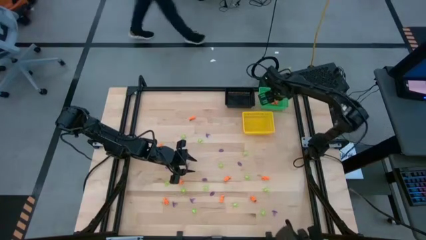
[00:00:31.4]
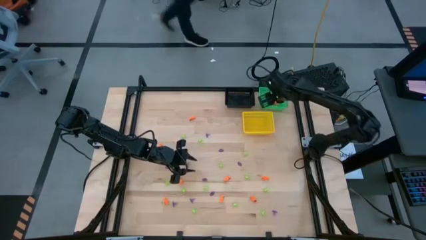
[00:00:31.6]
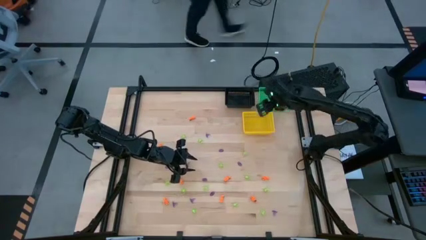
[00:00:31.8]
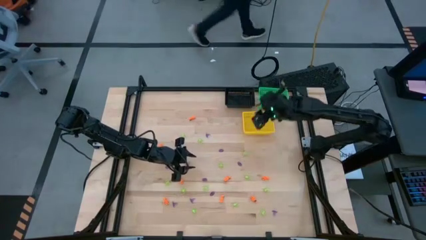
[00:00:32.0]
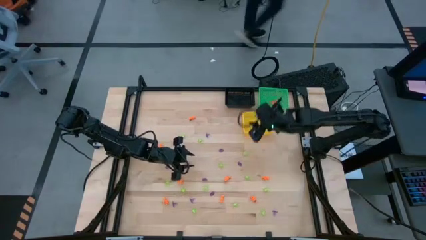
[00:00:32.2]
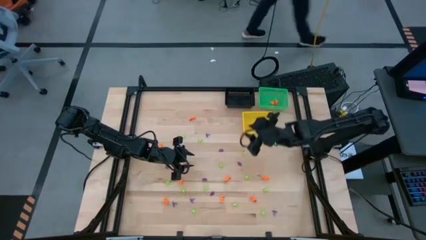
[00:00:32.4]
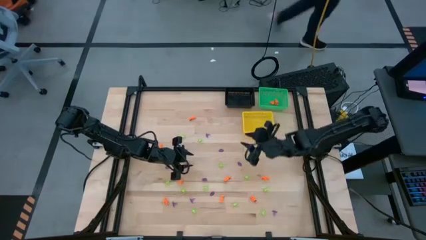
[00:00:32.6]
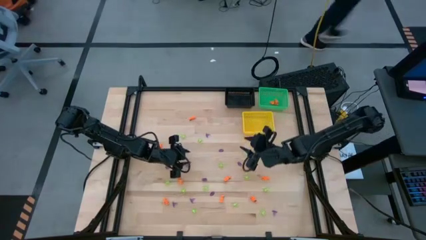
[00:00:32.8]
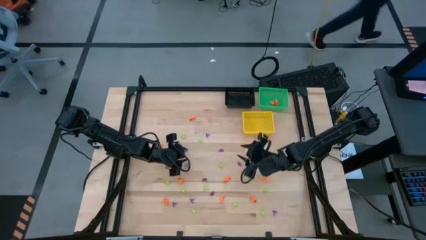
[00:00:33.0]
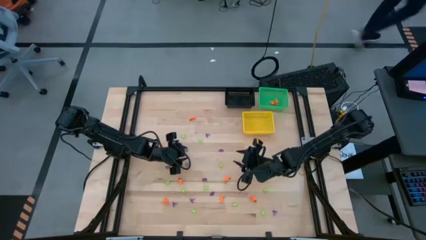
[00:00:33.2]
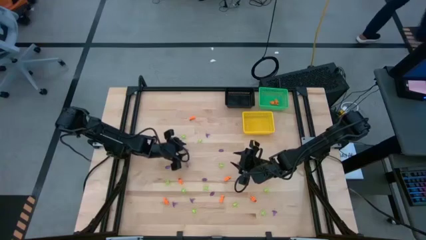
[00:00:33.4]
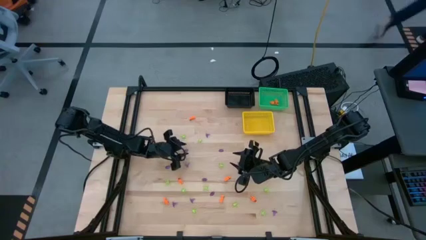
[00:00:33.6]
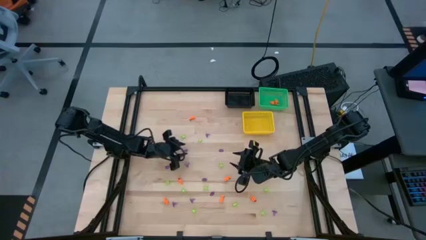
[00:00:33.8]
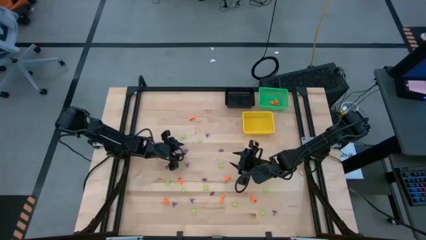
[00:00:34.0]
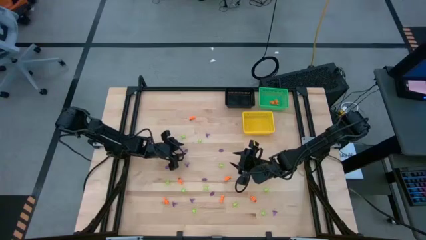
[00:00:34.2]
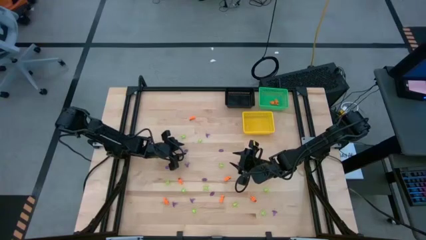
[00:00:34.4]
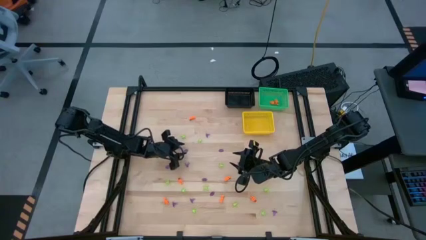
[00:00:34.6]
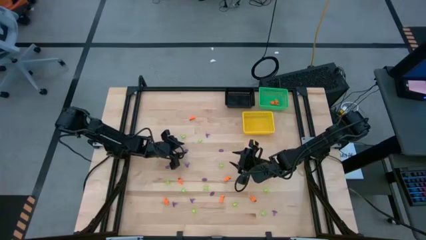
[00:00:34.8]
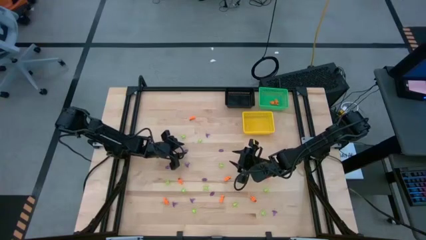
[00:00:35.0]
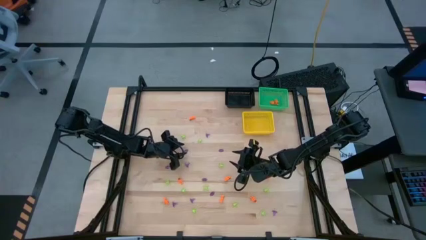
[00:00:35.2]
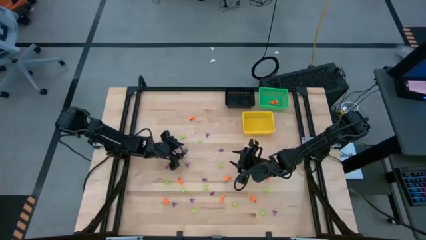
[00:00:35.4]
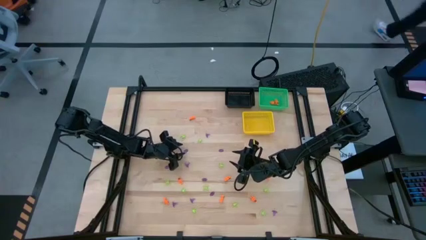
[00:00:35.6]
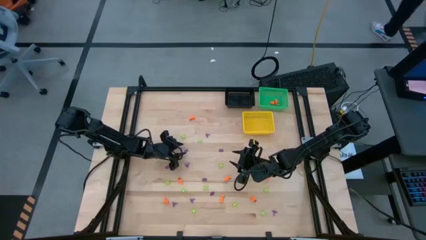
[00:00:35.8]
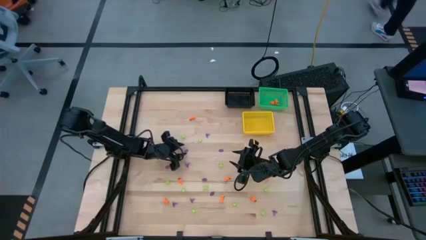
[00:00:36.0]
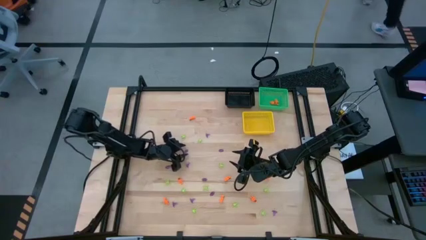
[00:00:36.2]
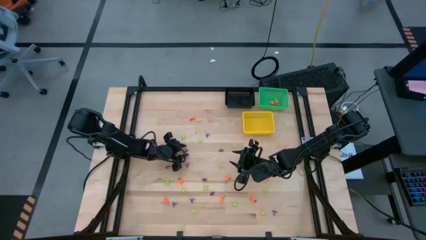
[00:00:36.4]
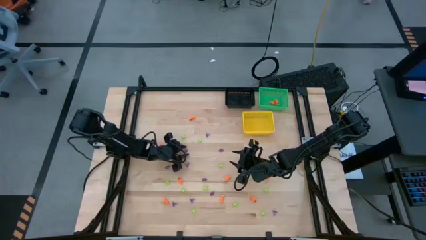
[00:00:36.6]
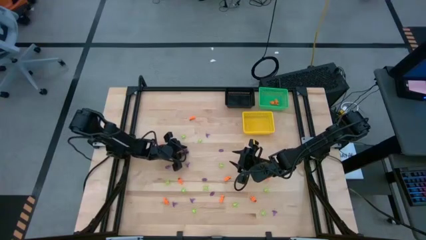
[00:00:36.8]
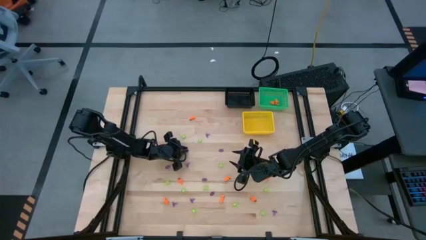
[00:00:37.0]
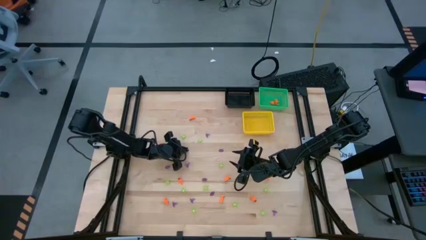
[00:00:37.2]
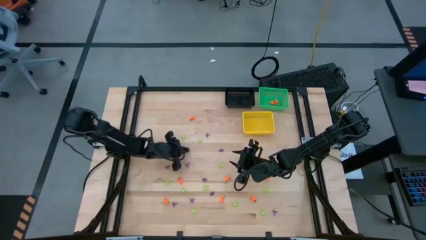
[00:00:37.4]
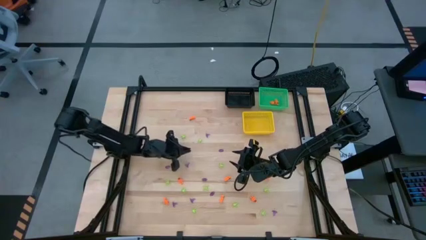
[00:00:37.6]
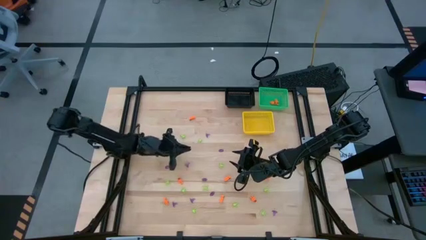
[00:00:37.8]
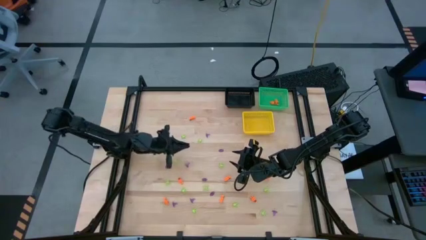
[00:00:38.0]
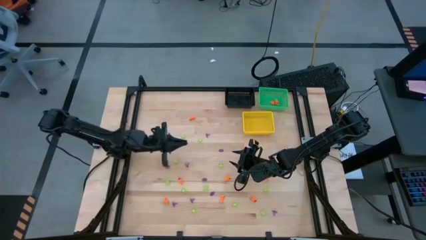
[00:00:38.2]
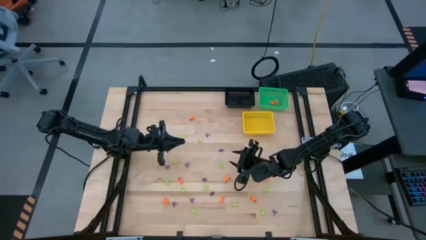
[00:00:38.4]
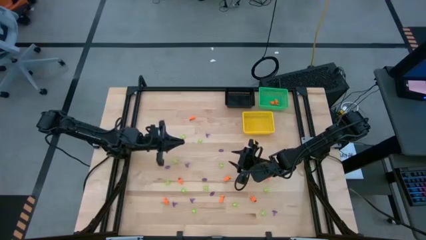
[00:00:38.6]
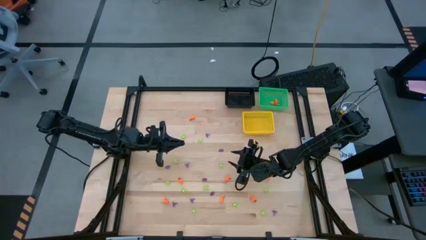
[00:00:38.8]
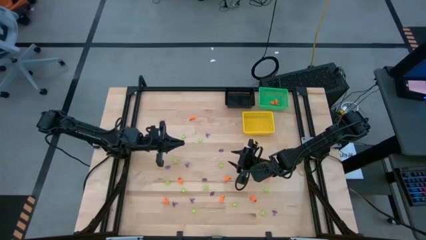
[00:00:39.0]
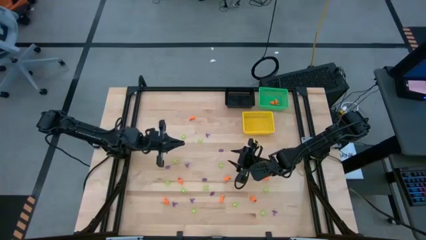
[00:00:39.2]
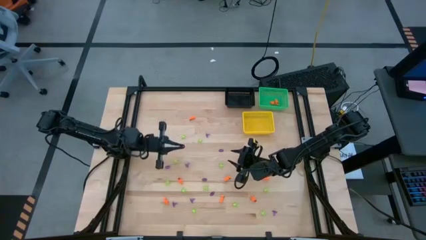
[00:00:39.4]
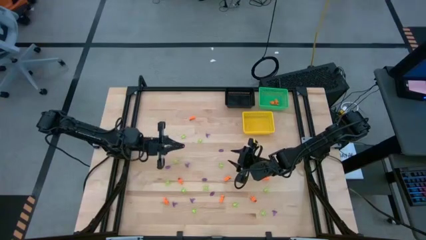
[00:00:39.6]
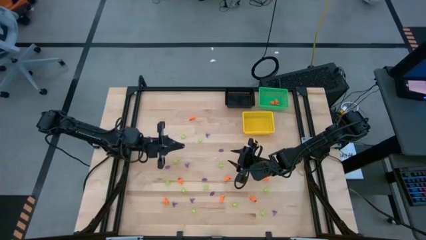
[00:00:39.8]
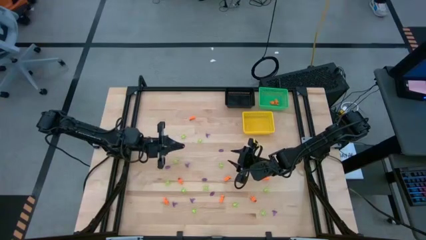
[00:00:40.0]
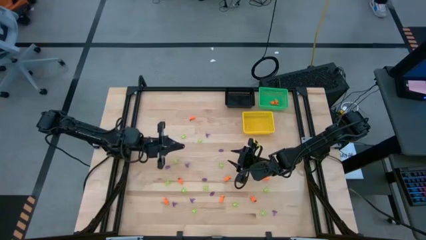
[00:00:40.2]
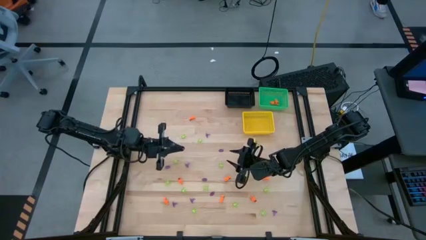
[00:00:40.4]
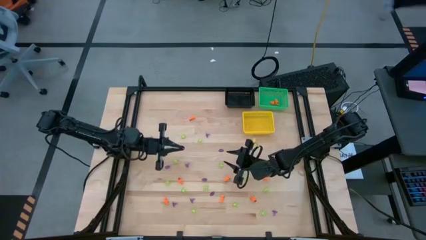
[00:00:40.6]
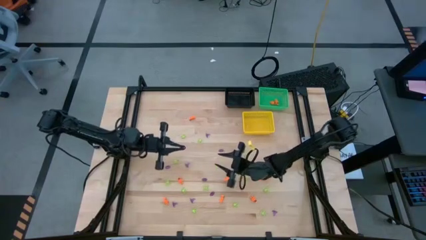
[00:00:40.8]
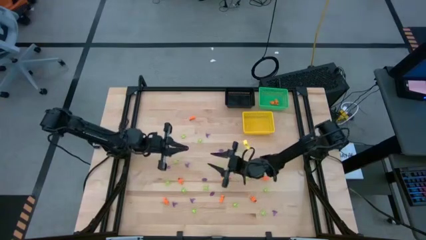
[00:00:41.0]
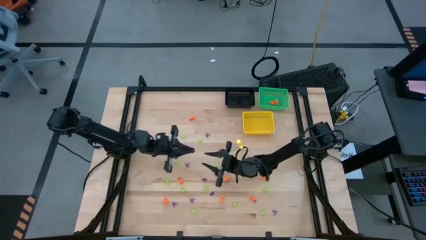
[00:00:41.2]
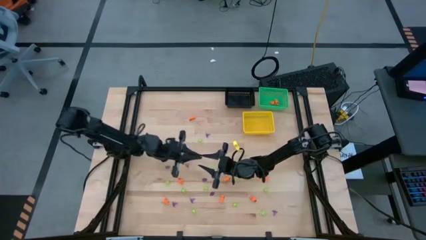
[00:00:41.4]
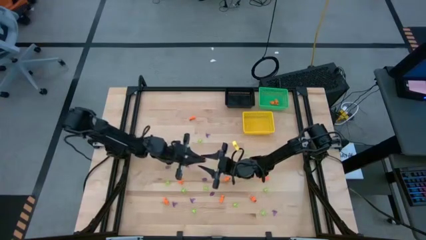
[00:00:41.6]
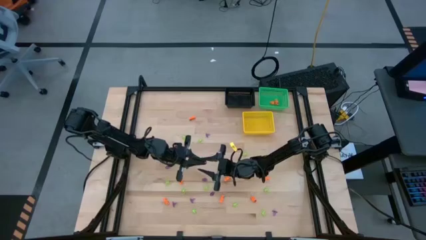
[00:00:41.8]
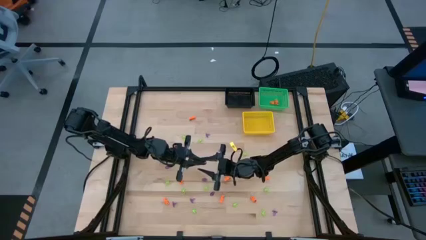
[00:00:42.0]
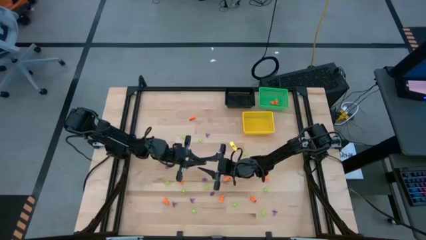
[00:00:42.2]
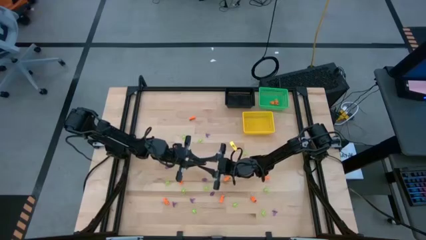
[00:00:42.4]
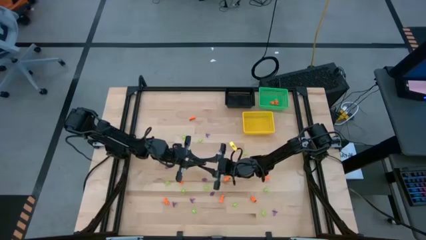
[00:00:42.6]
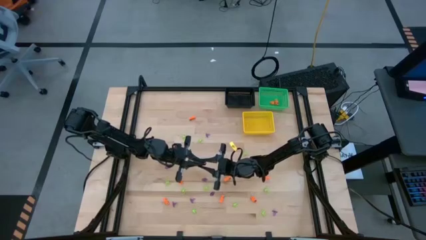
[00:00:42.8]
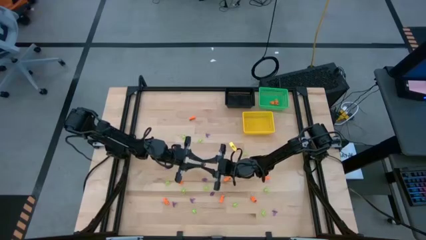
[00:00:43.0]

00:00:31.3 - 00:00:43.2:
Task: Sort Halloween decoration
Put the violet witch hat toy into the yellow basket

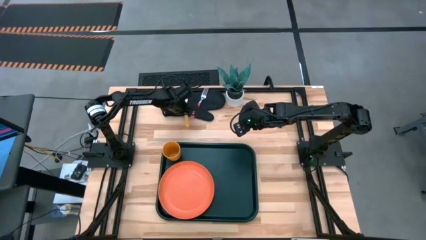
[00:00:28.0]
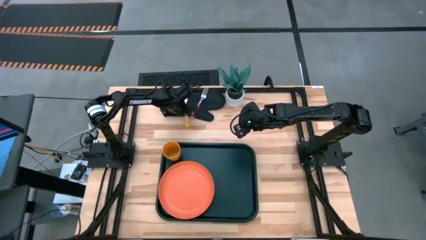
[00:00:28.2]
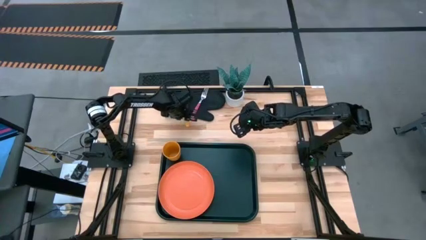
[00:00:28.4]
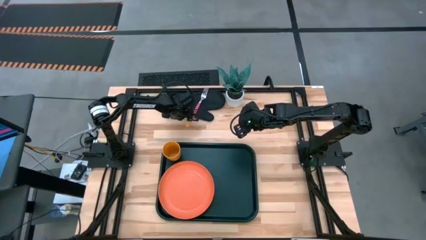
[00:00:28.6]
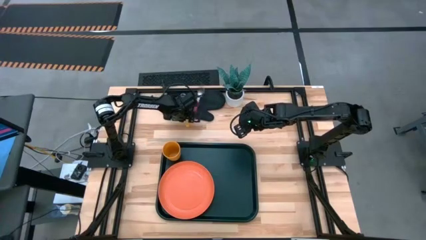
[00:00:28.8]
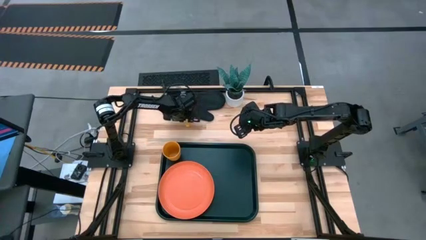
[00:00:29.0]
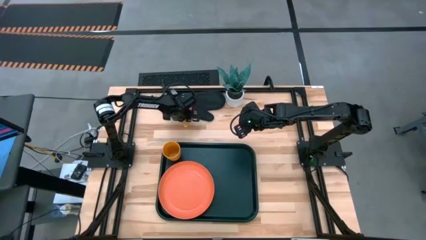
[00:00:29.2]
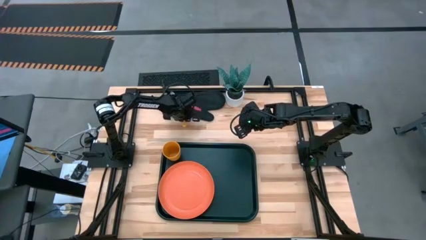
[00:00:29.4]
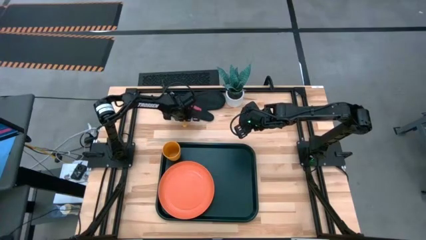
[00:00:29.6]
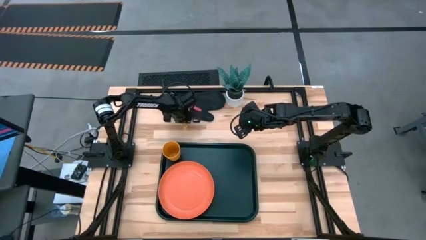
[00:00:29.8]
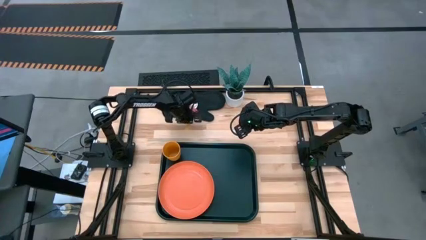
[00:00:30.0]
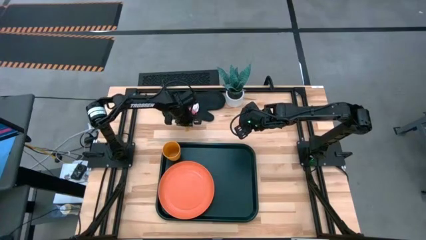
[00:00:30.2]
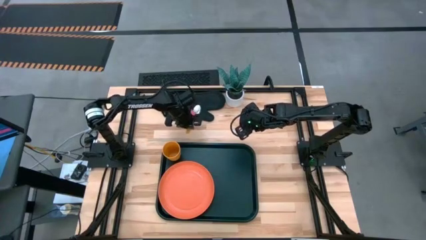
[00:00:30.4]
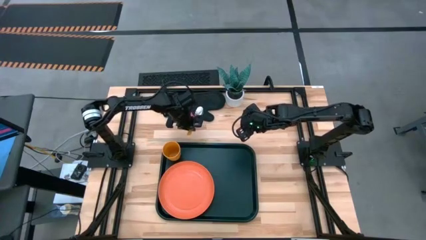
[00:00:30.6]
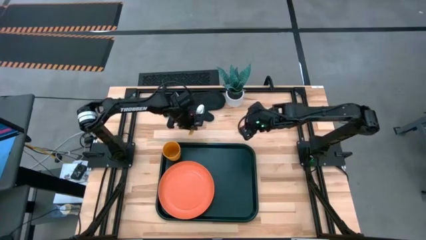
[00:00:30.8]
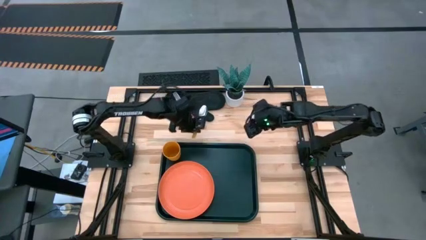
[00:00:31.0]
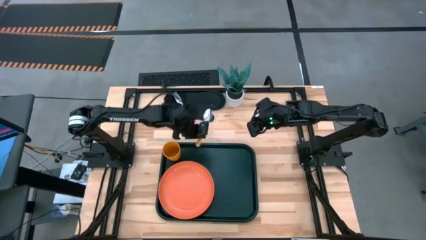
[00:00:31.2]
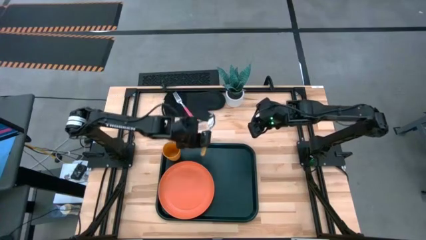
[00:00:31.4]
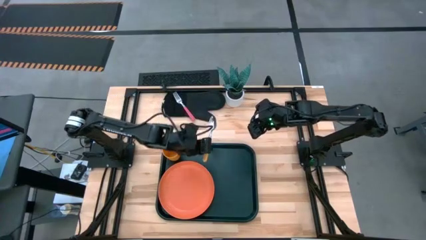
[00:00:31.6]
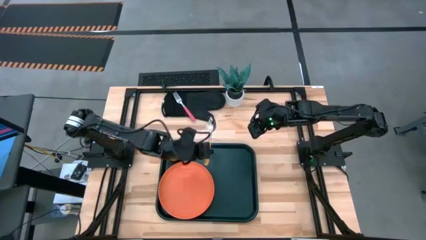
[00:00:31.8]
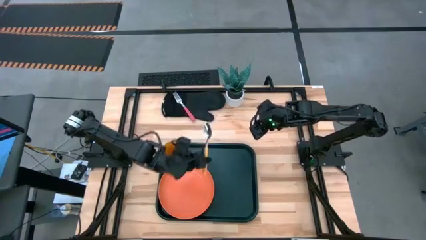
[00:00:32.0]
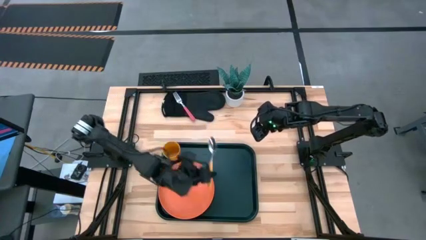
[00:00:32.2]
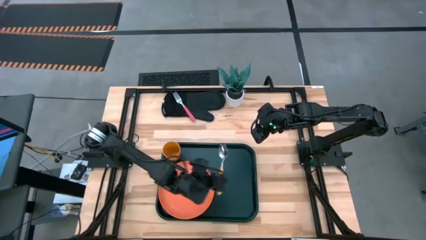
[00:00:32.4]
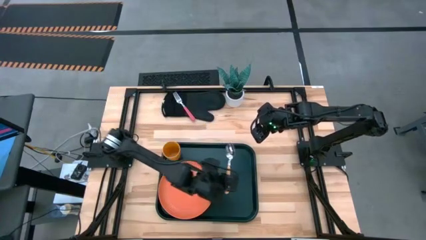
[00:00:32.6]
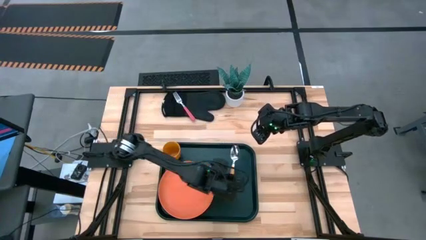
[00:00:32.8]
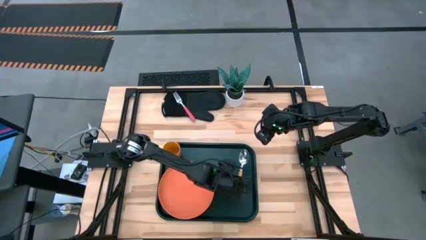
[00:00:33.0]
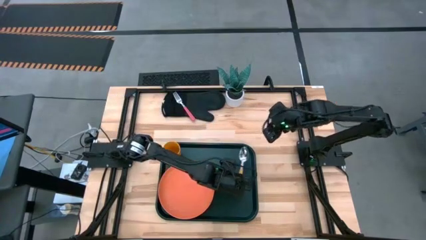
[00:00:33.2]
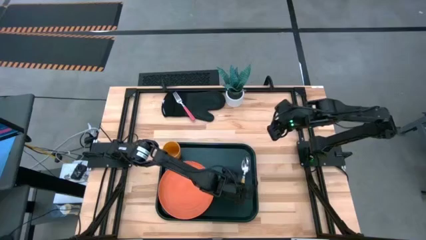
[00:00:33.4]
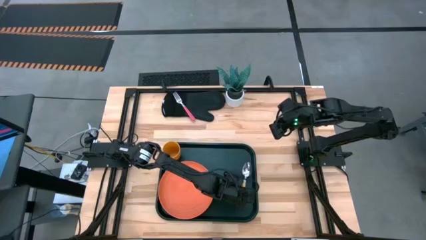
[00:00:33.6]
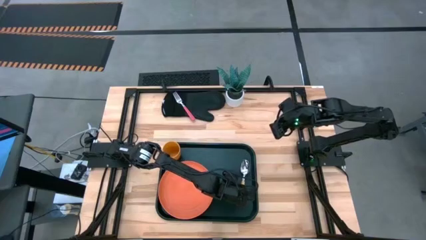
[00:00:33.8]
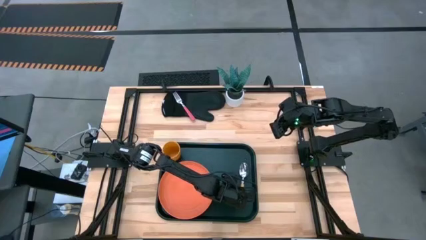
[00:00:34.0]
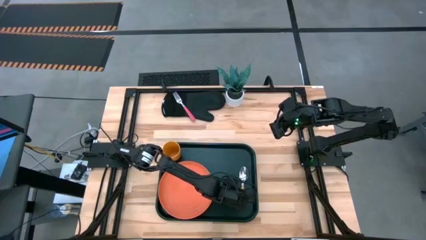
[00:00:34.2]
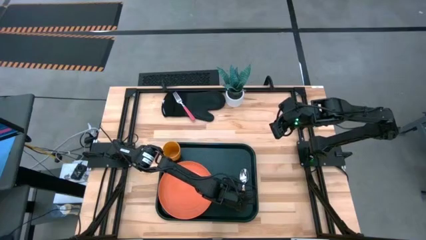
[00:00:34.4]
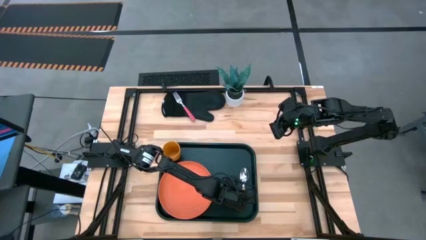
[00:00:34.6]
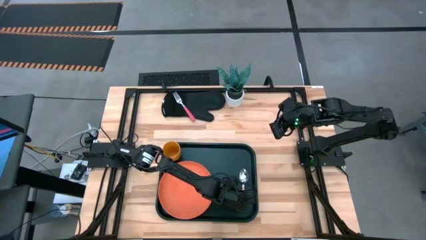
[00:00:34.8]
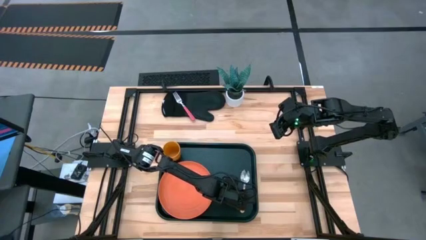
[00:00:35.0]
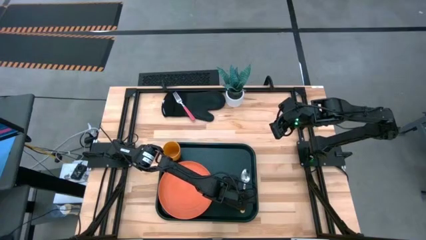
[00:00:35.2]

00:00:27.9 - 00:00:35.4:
Task: Pick and place plate/cup/fork/spoon on tray
Put the yellow spoon to the right of the orange plate on the black serving tray
